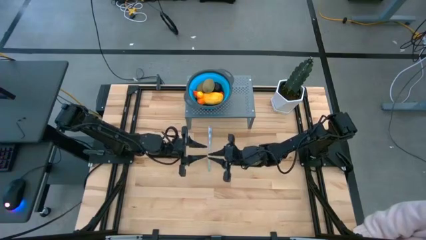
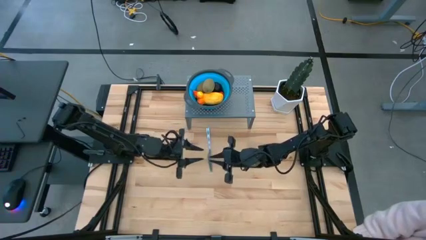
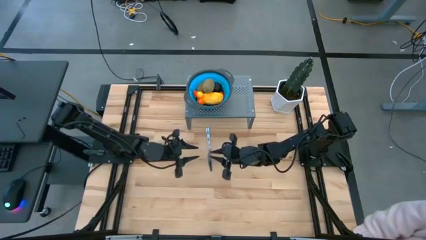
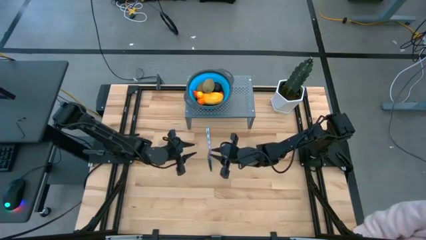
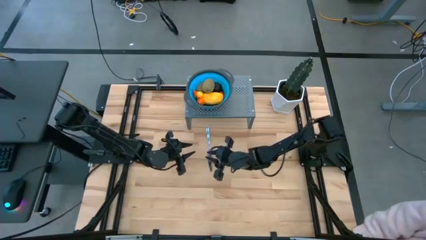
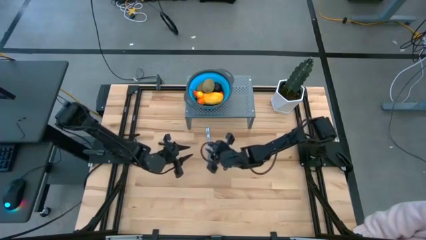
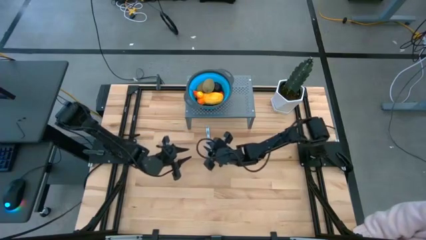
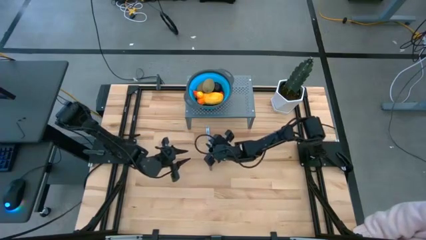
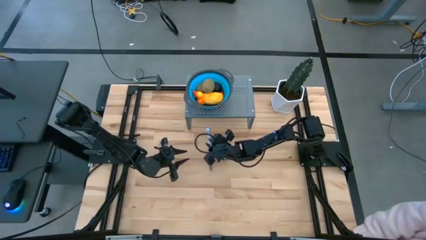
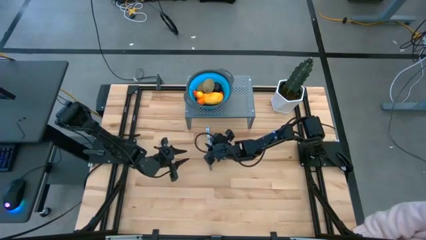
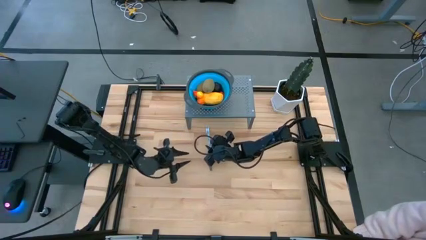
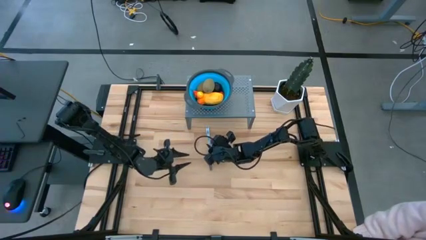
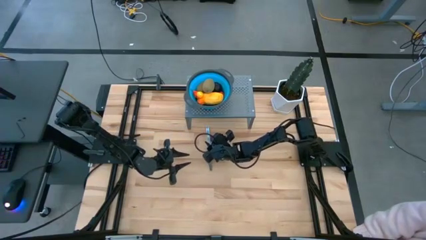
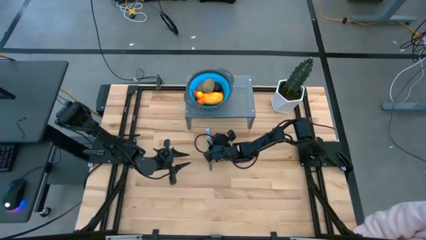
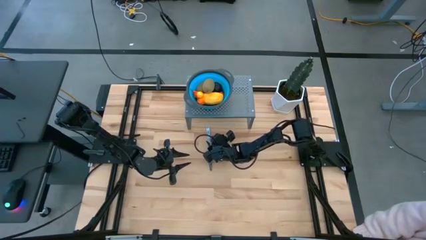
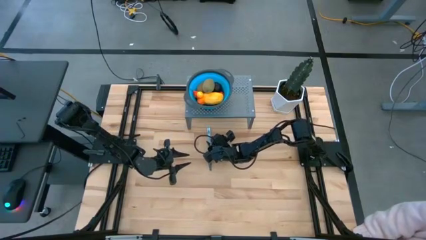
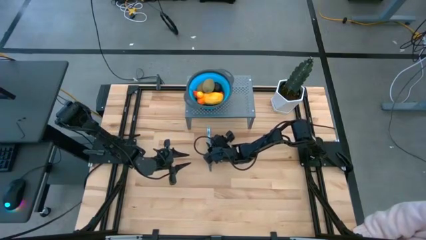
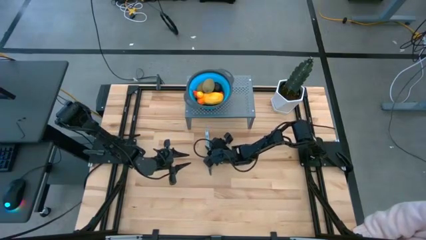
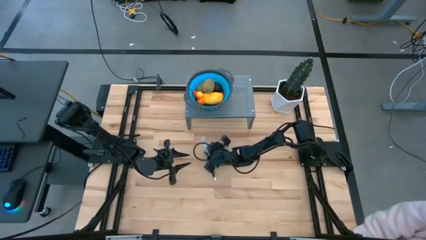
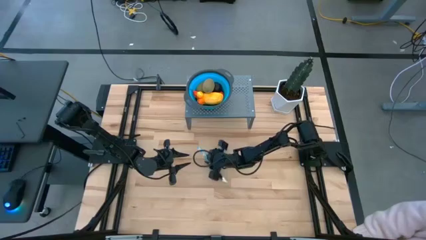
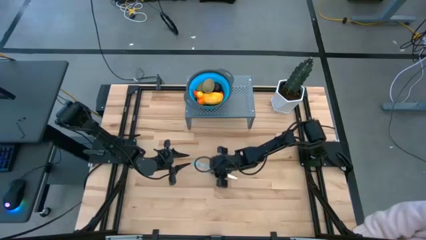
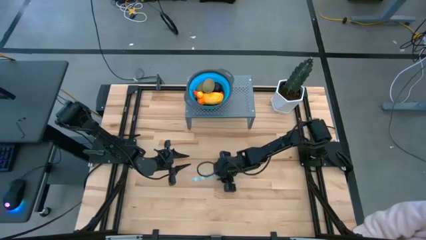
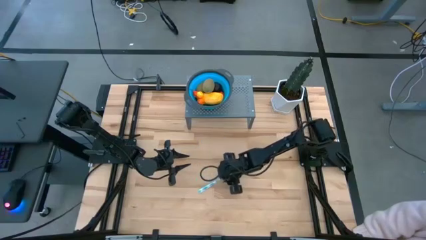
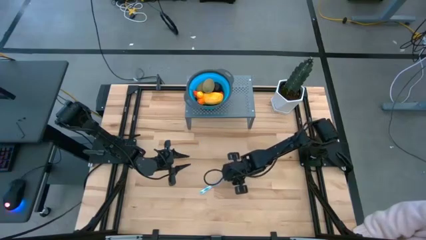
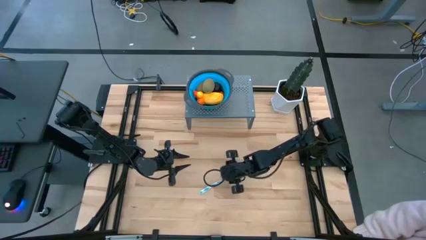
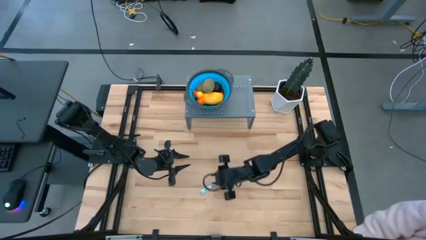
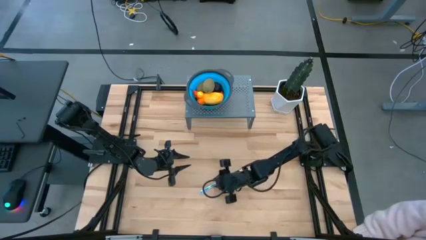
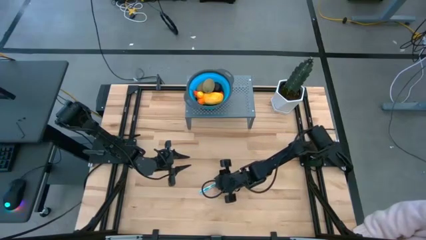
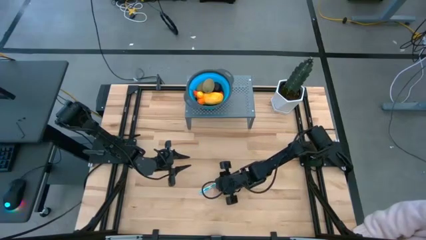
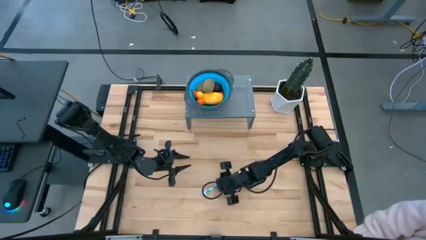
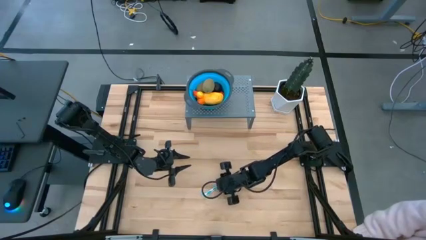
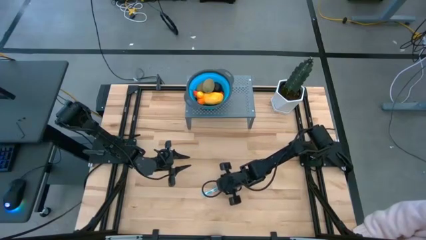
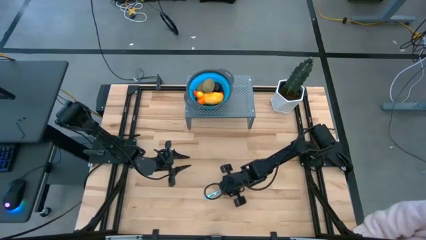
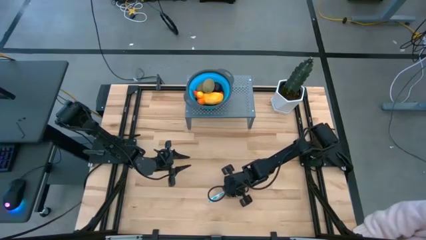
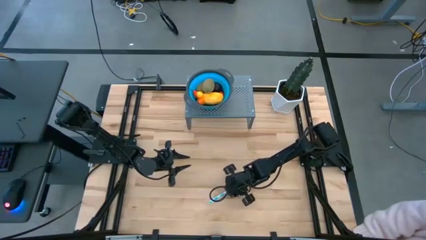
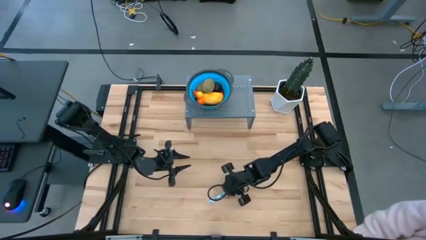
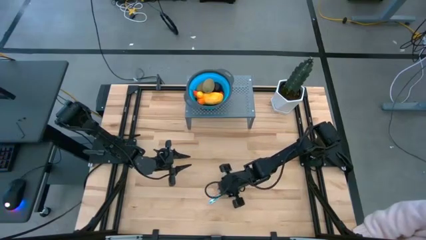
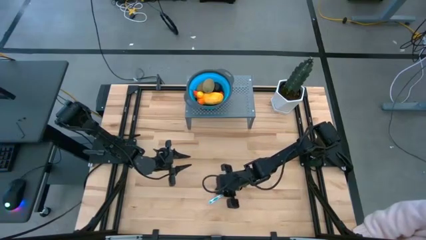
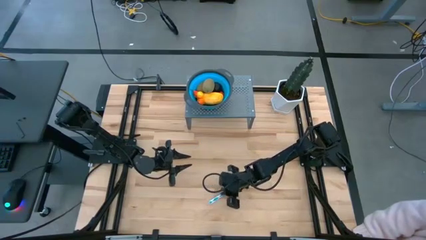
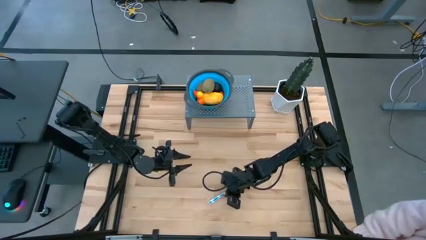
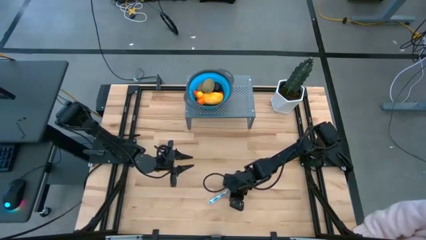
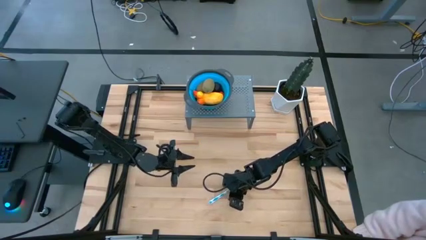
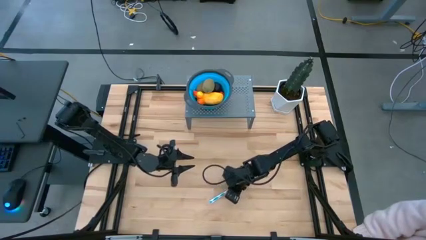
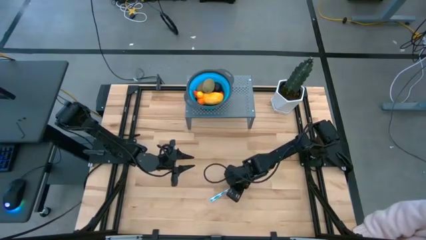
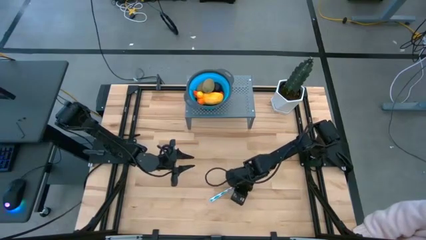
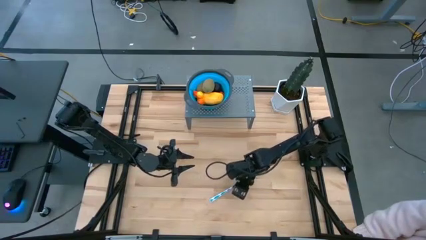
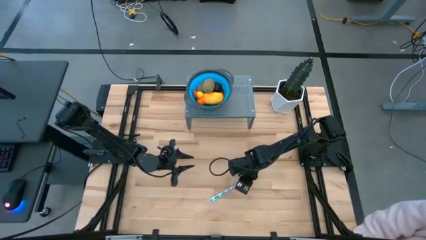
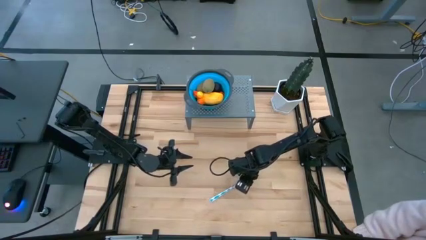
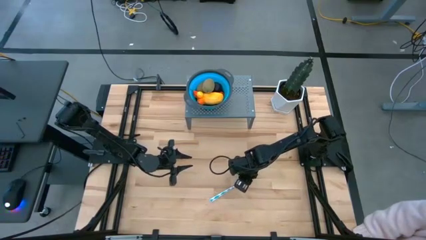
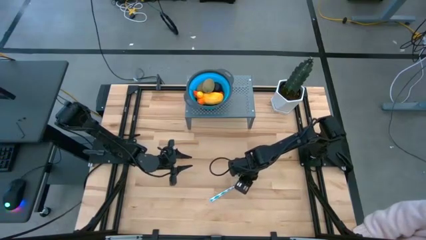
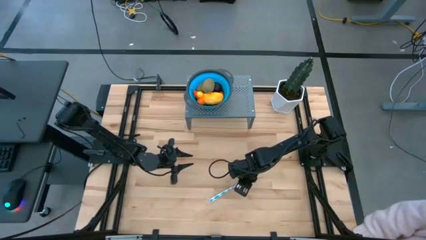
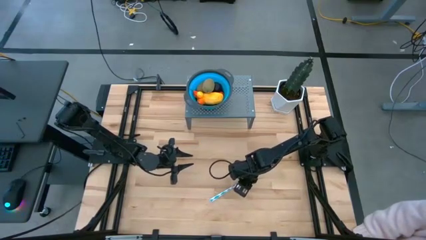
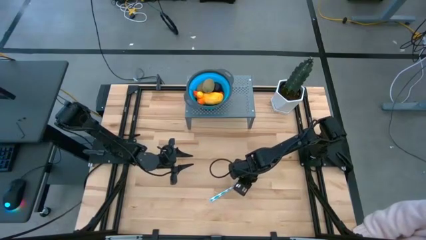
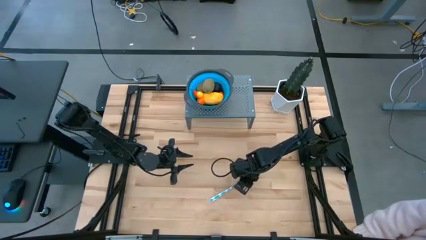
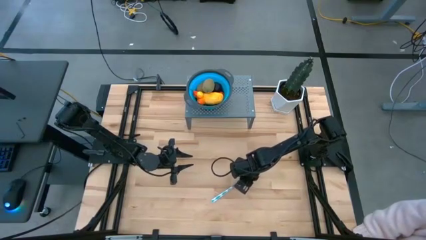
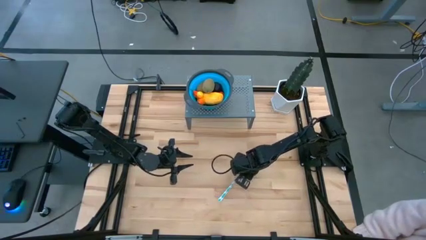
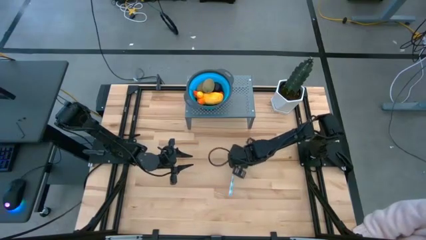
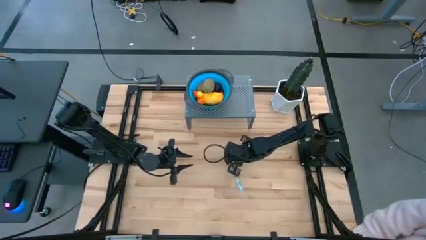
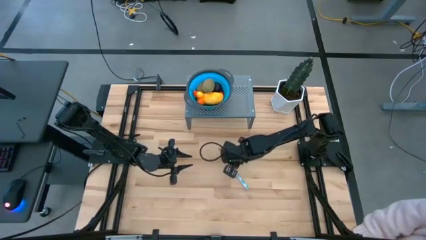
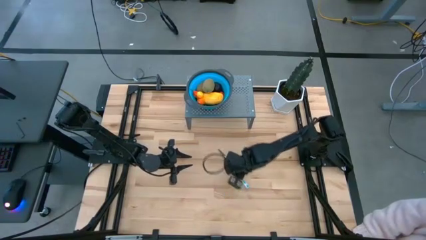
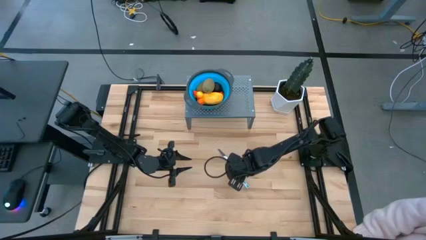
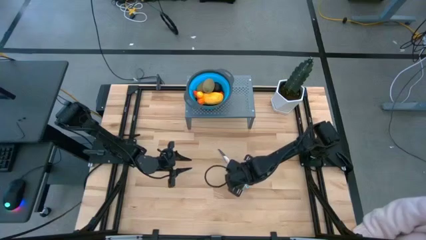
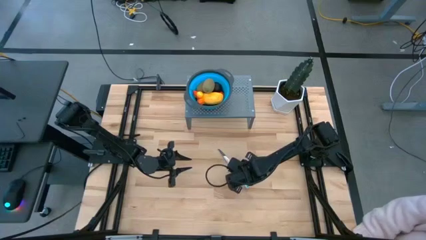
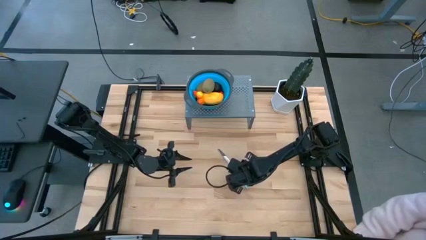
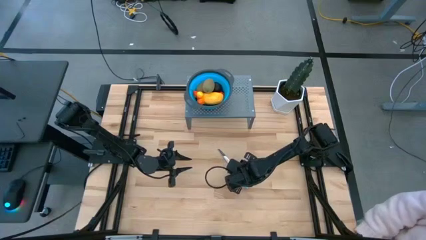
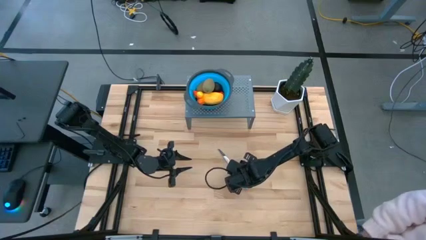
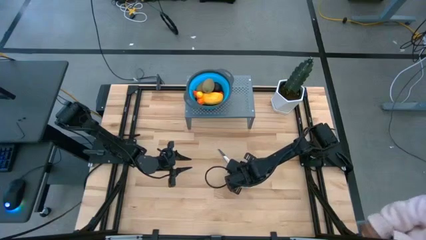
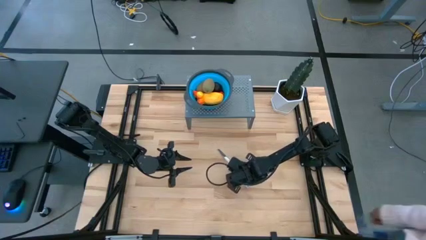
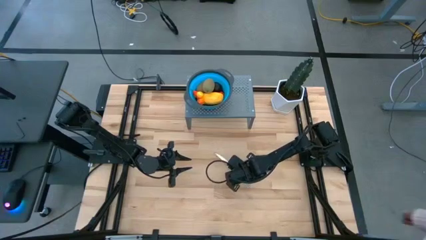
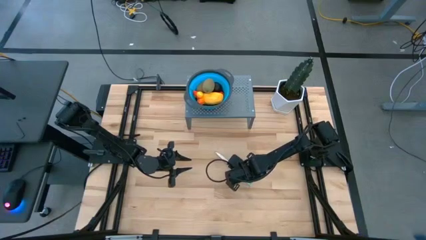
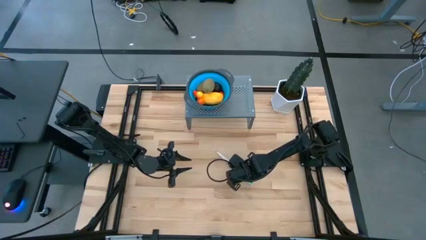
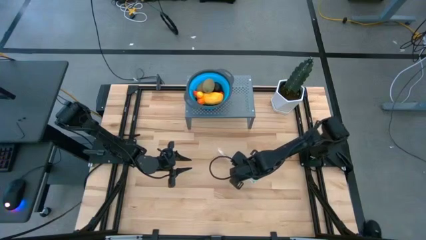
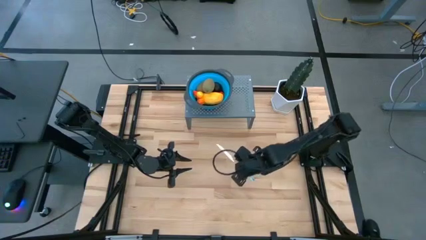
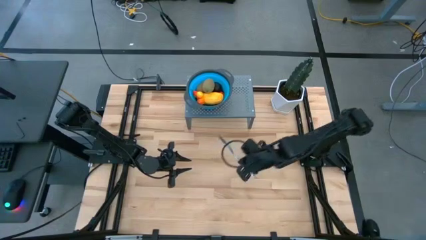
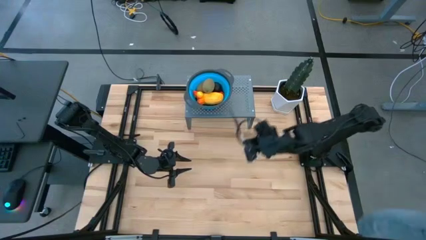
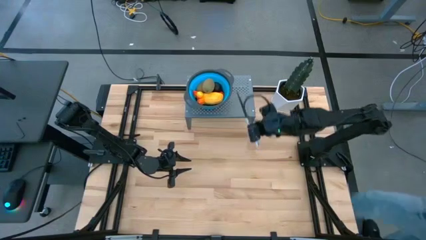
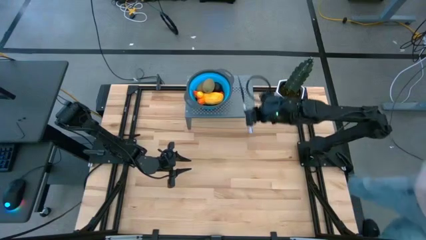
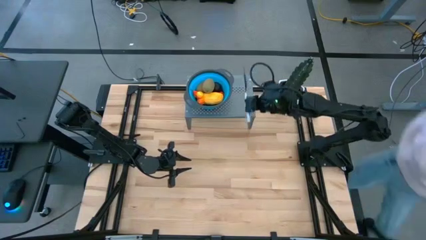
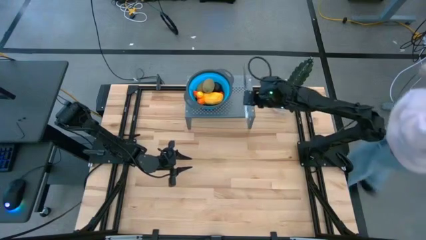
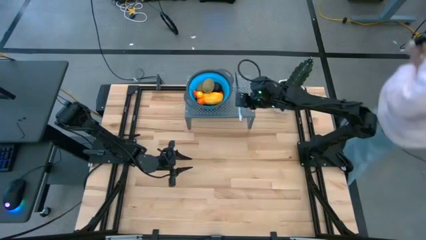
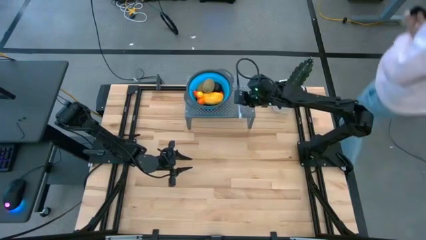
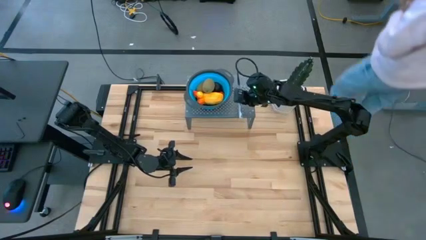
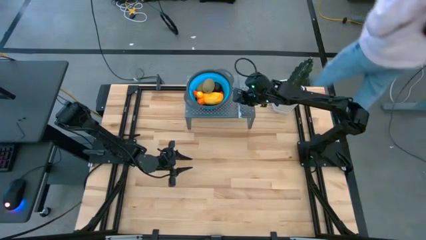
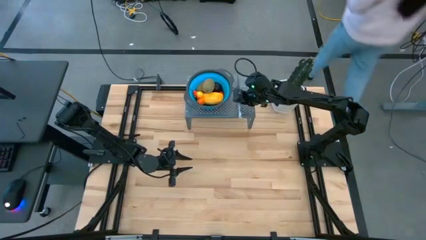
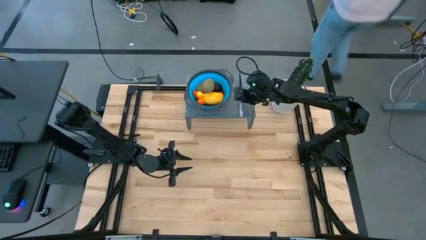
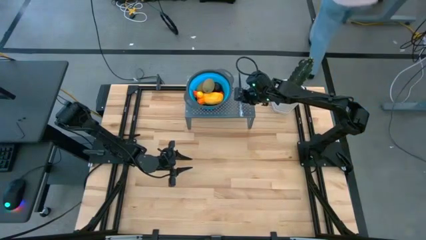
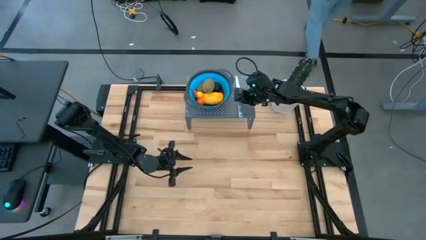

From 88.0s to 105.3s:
Task: Pick & Place Fruit
Put the blue knife on the shelf
